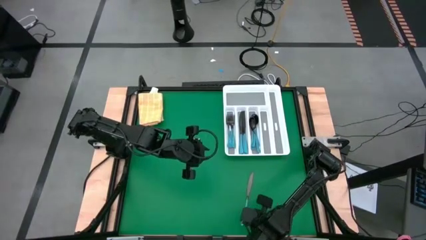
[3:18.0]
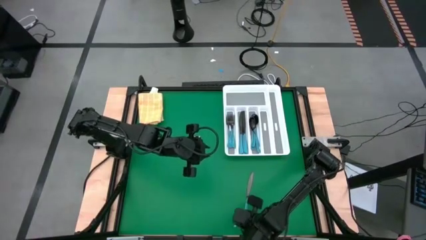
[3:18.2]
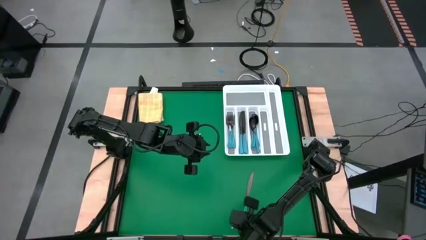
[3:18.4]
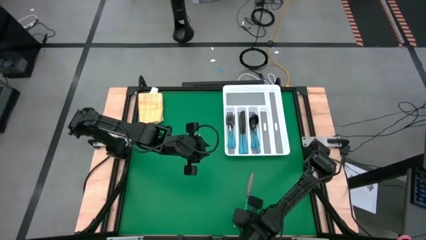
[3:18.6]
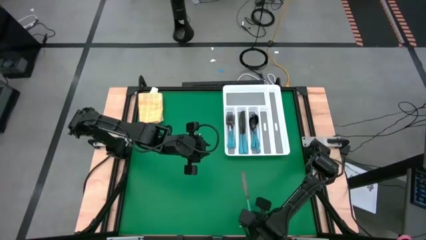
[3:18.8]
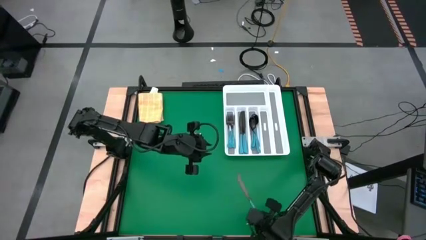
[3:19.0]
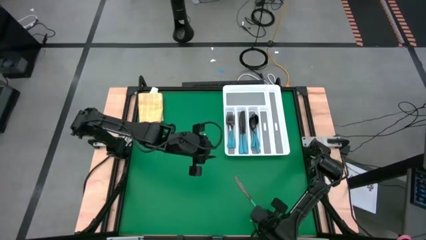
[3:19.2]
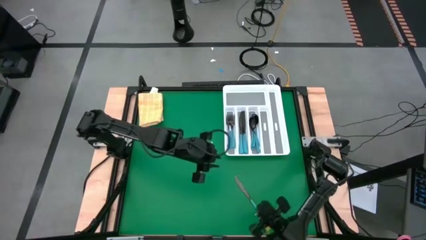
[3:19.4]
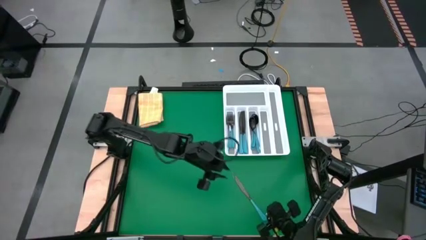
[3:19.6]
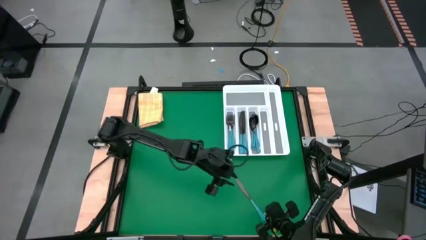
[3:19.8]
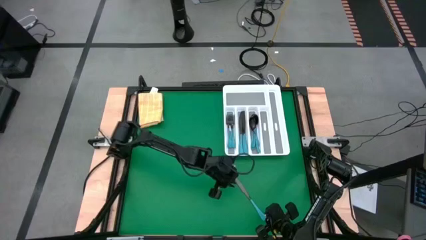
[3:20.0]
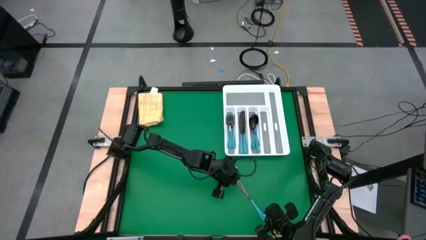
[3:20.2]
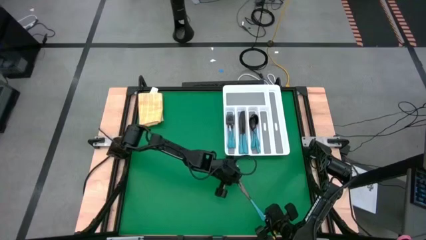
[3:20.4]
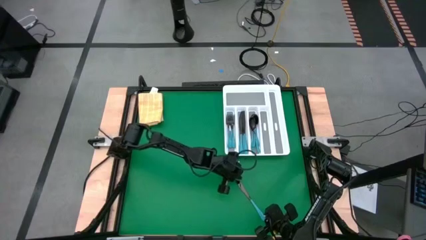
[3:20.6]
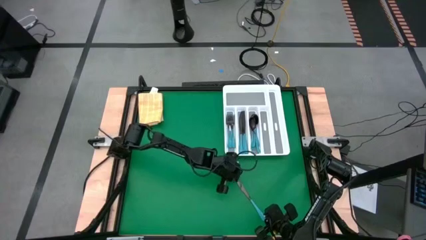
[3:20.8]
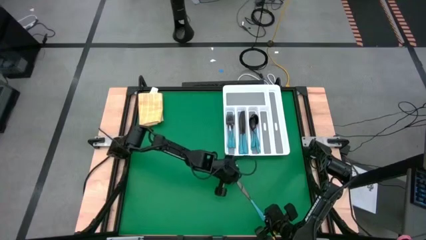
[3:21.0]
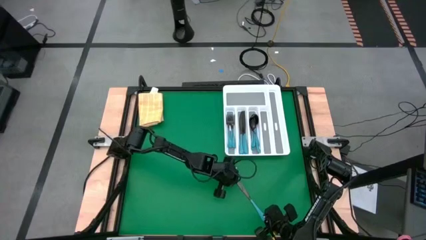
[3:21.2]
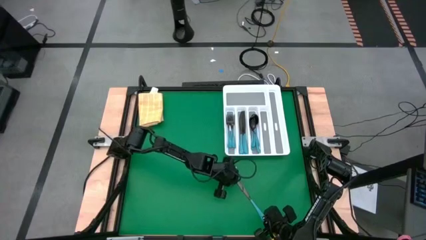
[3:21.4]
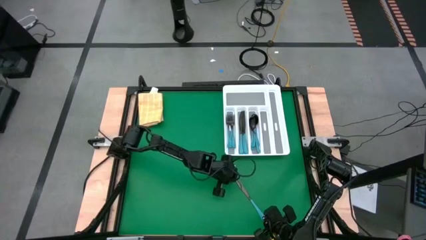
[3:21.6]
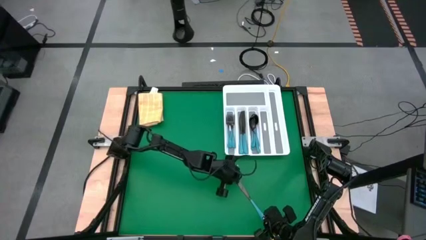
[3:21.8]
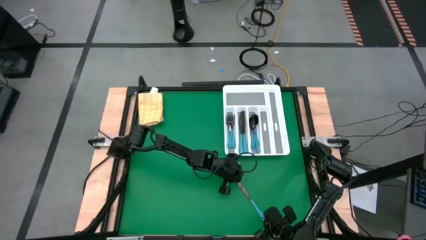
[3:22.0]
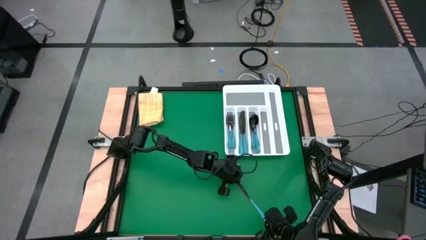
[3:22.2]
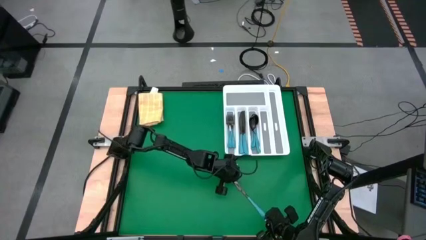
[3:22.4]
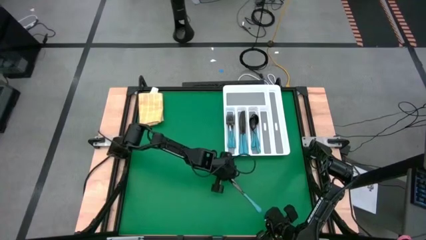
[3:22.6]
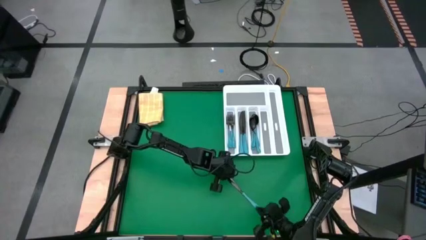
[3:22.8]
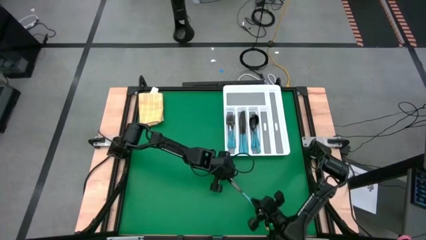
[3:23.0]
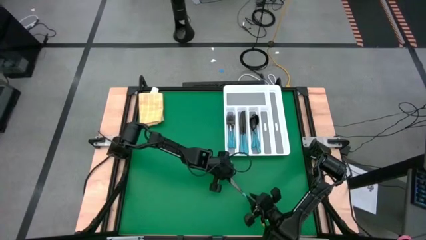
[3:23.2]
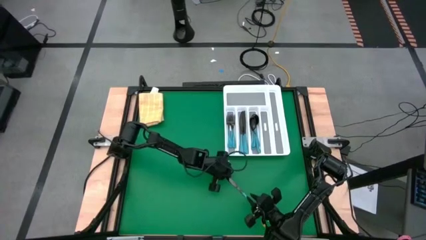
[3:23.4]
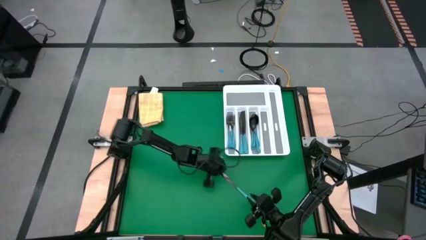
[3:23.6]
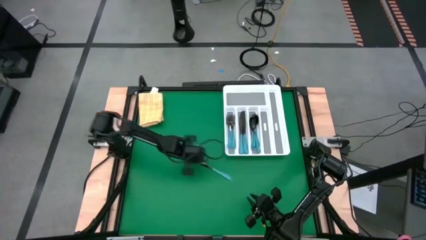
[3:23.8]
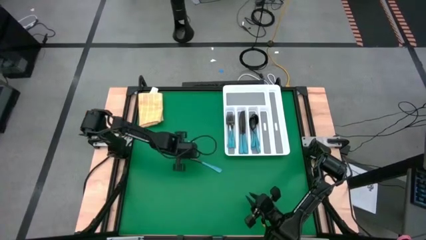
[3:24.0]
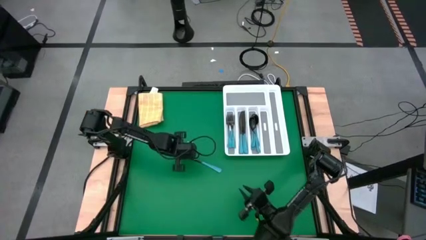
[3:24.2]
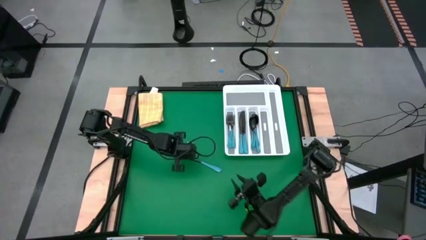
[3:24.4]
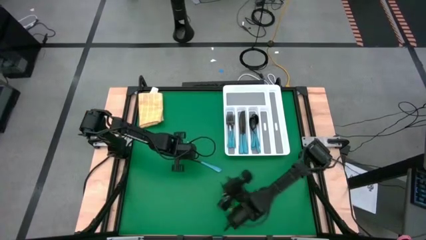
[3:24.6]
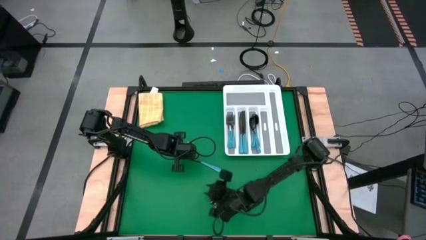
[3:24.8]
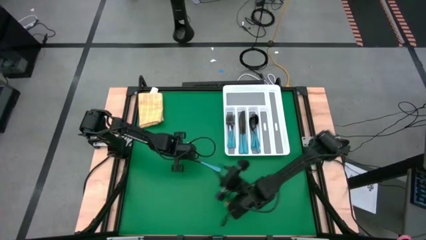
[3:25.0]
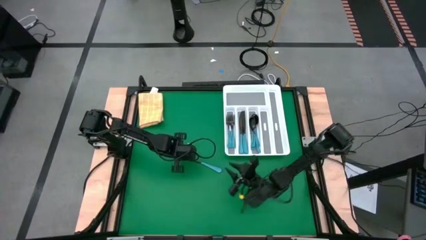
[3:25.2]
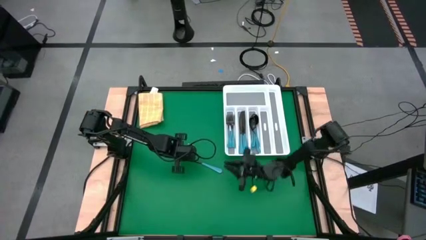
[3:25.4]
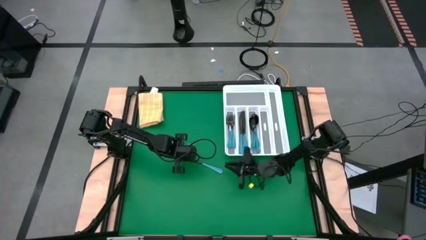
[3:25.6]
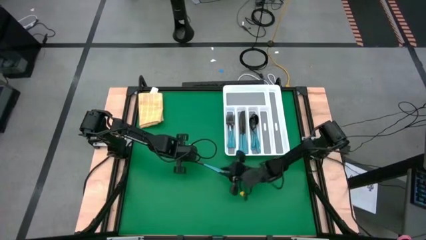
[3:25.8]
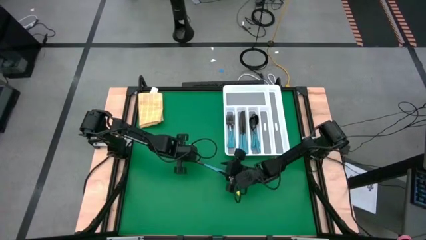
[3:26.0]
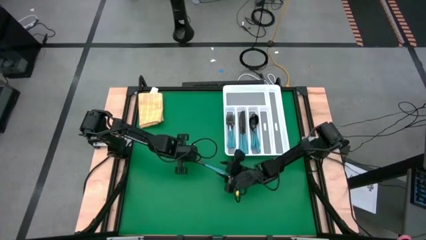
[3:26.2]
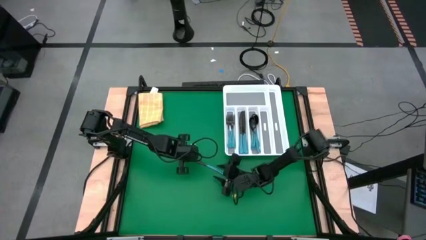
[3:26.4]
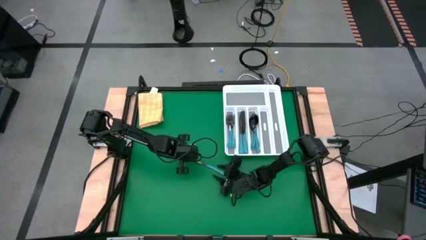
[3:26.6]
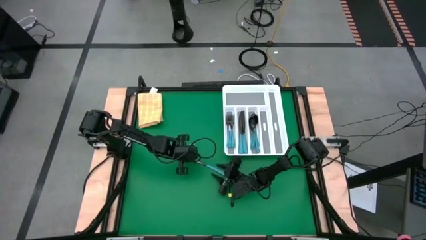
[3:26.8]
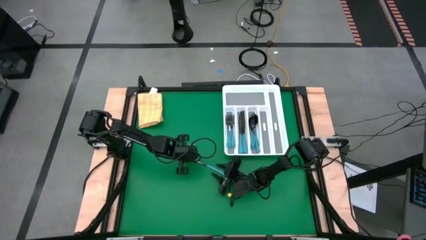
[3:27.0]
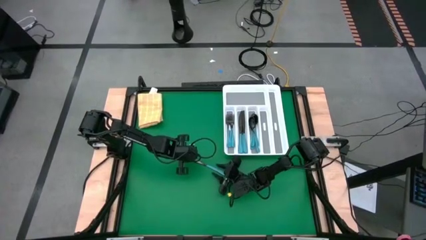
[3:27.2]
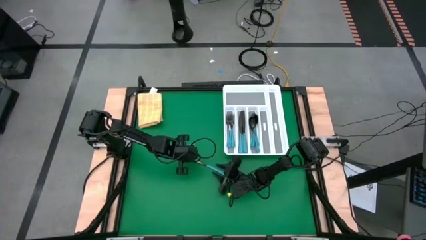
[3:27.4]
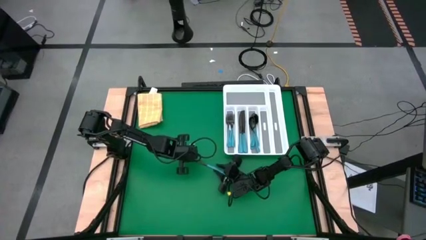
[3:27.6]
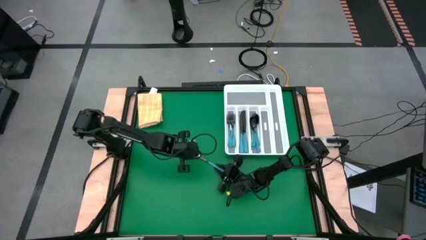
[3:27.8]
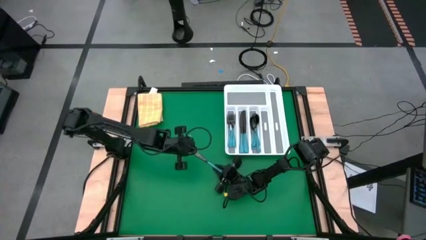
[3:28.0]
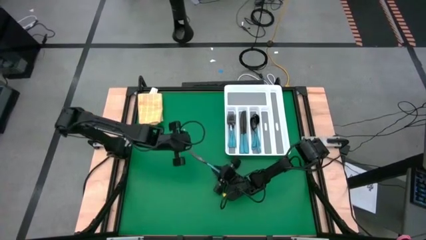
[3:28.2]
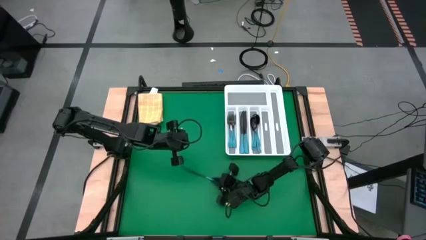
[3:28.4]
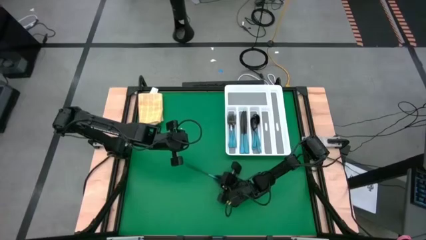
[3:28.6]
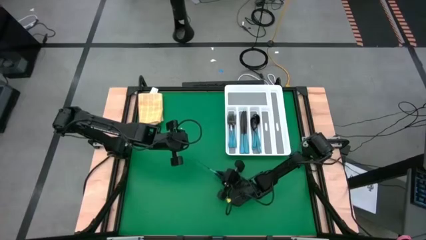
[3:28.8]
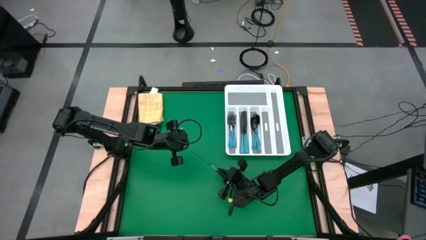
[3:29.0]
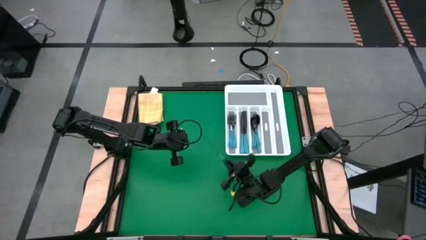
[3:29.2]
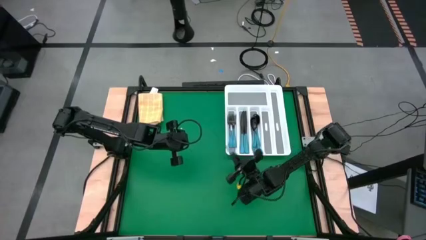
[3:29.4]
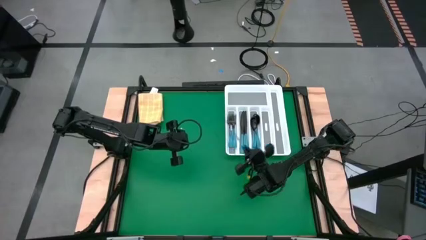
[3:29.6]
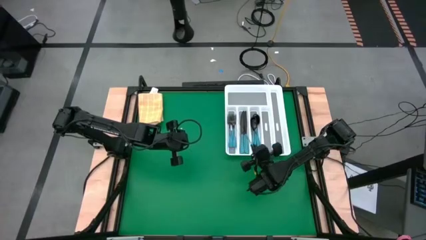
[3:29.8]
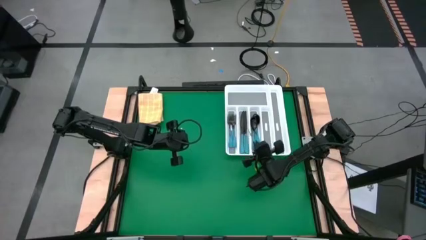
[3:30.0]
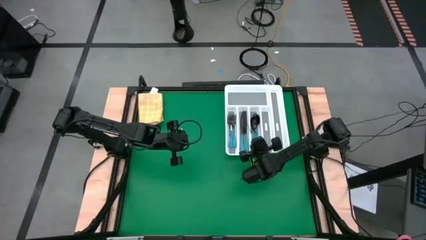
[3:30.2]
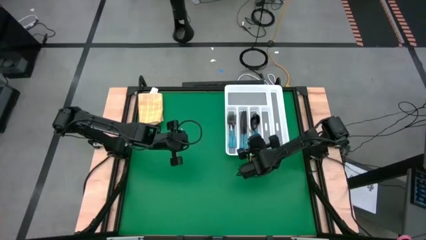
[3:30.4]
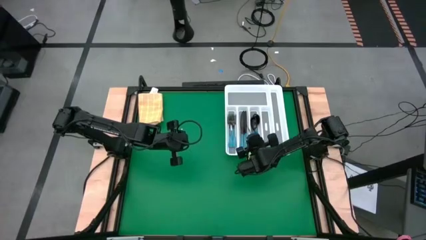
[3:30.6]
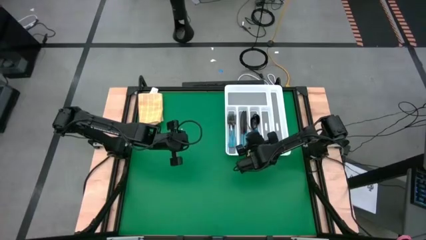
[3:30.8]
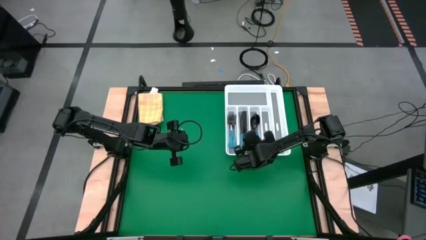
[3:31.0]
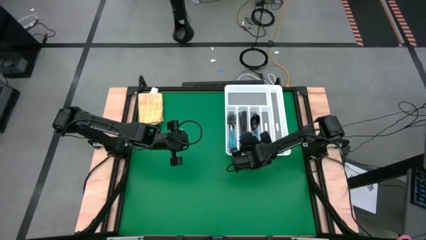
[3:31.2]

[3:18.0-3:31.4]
Task: Sort silverware
Put the blue table knife into the silverware organizer

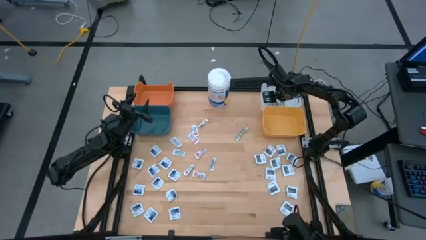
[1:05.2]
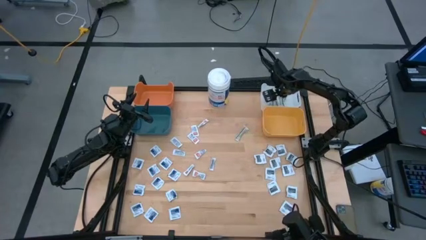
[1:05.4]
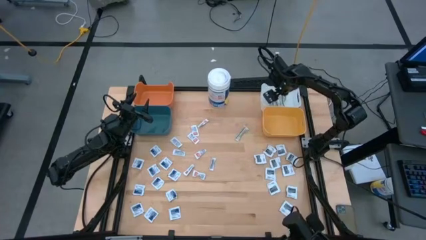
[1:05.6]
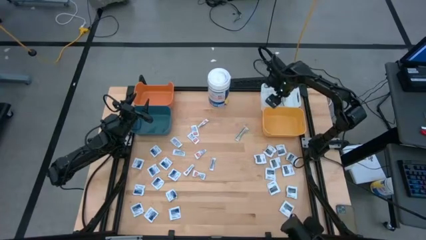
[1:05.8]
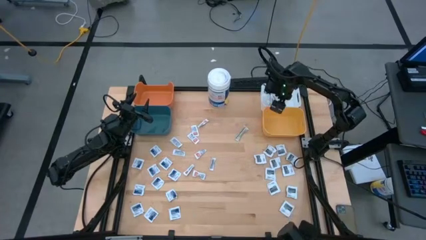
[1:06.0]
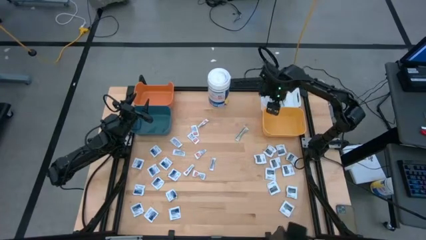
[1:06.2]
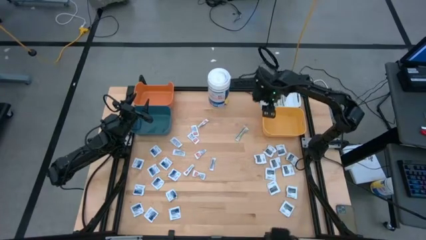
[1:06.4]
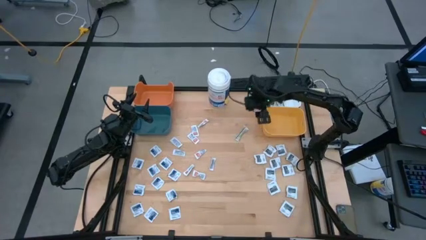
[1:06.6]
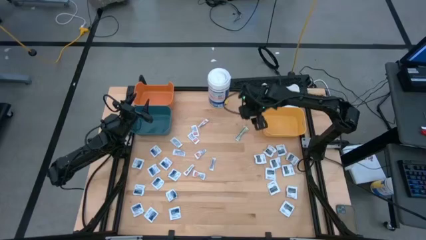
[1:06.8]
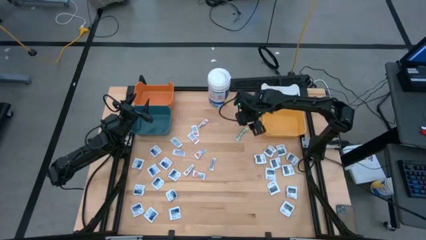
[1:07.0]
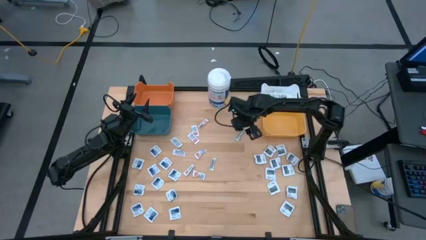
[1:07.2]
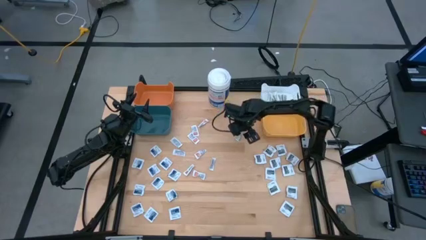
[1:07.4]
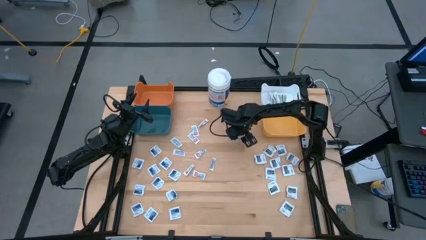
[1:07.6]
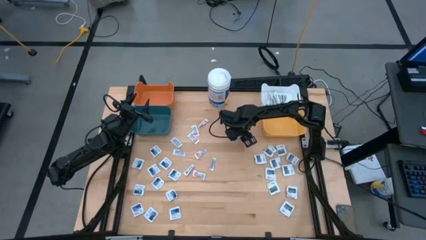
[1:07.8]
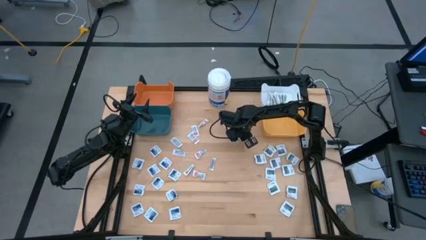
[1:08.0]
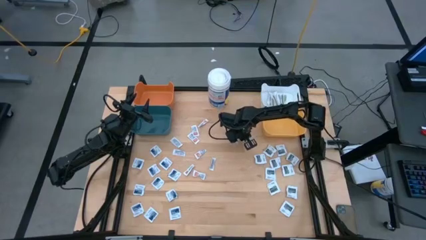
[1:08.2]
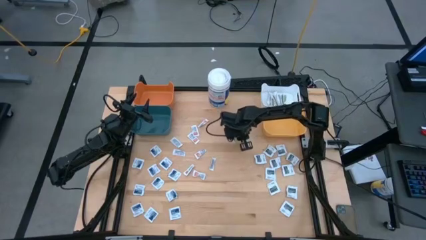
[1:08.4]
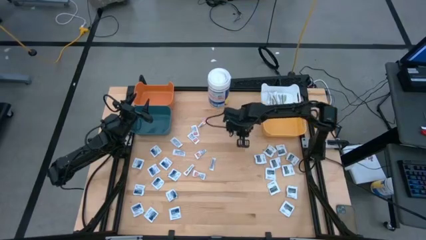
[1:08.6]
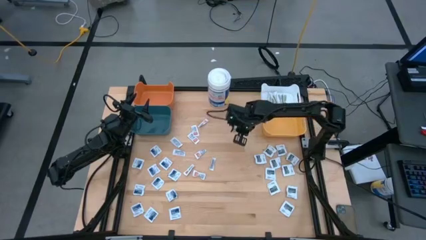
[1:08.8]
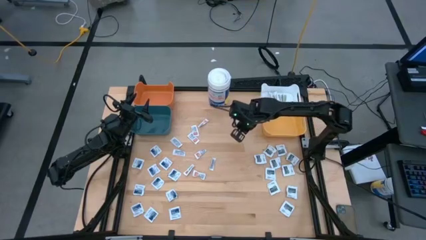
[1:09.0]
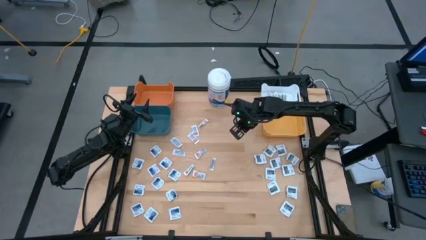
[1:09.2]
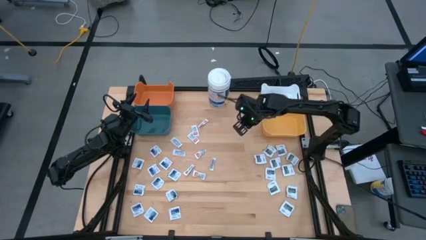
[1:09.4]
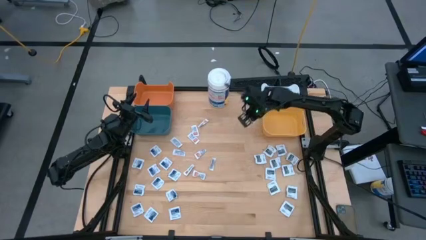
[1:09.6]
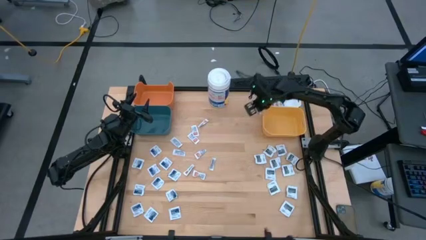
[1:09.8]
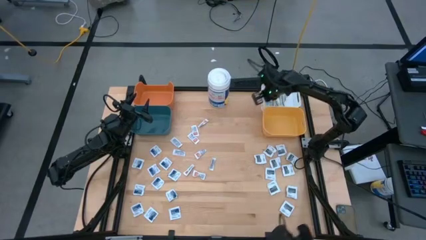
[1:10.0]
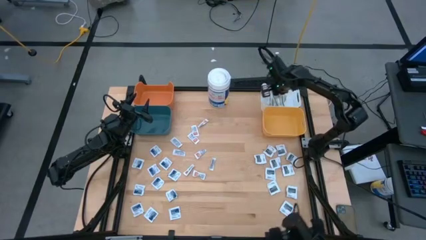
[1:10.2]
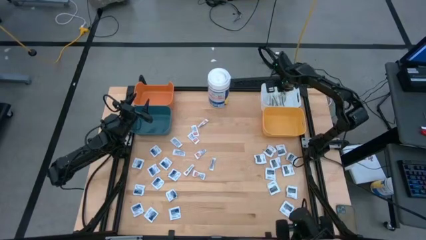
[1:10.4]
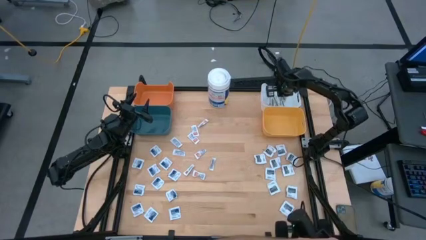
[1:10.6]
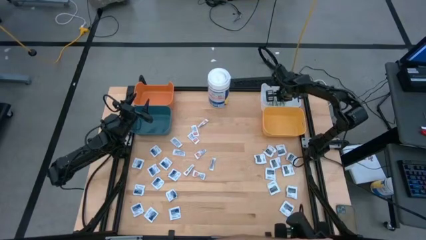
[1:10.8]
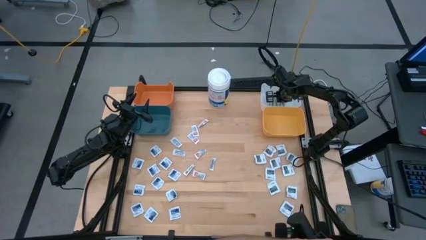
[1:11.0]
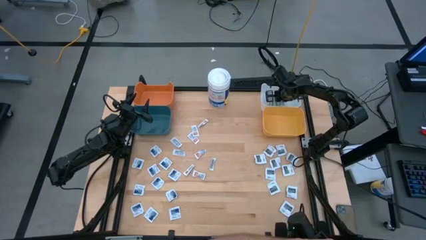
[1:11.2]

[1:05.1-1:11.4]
Task: Pick & Place First Aid Supplies
Put the green bandage into the white bin
